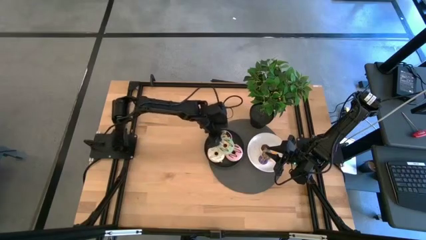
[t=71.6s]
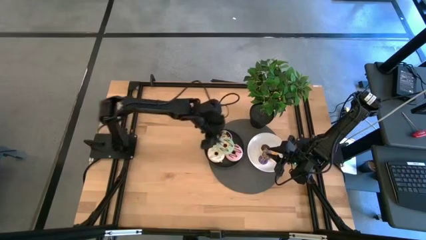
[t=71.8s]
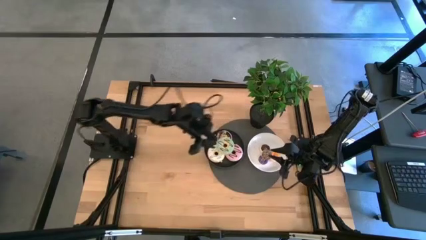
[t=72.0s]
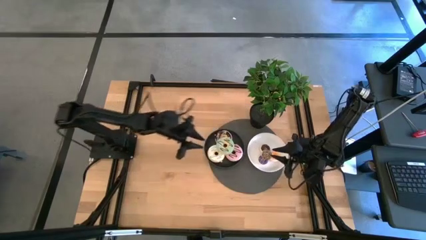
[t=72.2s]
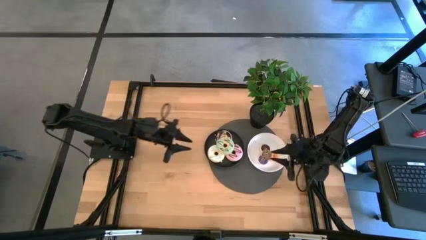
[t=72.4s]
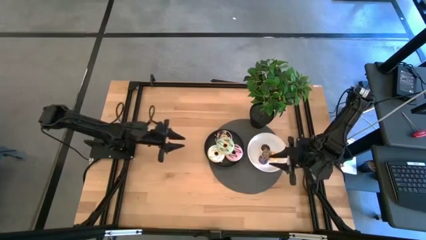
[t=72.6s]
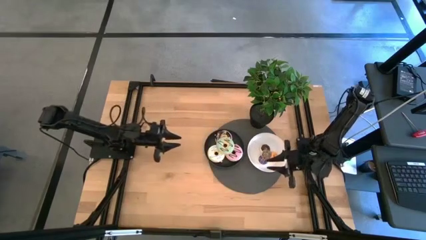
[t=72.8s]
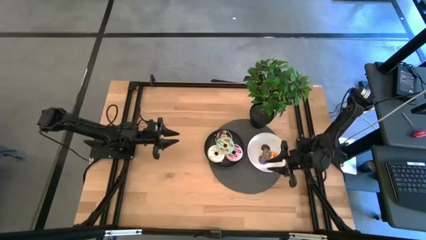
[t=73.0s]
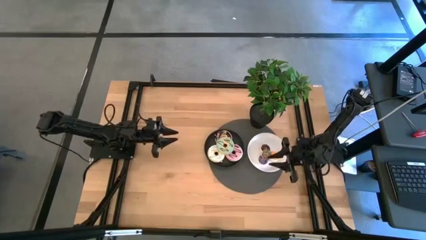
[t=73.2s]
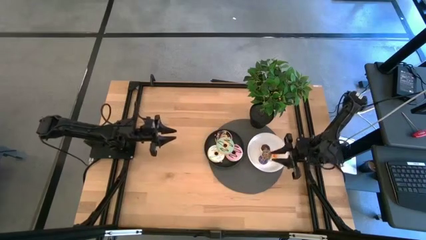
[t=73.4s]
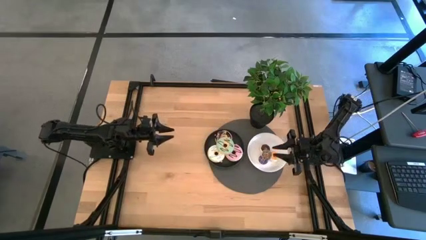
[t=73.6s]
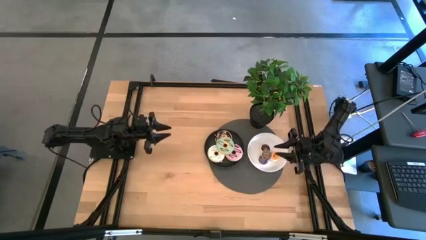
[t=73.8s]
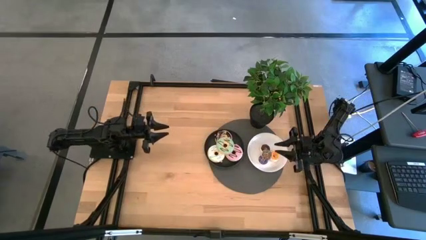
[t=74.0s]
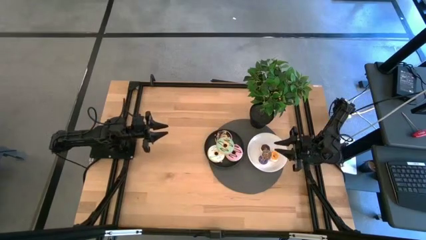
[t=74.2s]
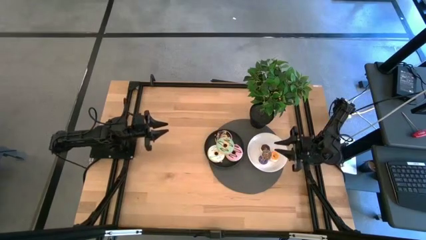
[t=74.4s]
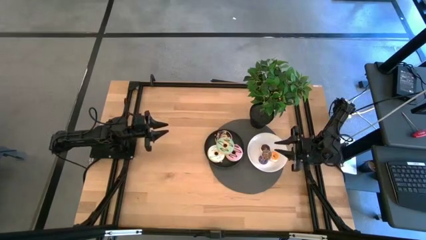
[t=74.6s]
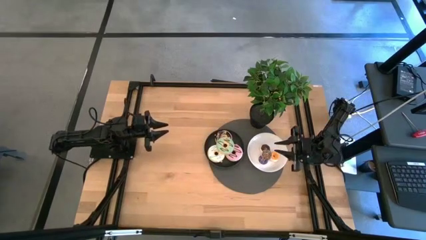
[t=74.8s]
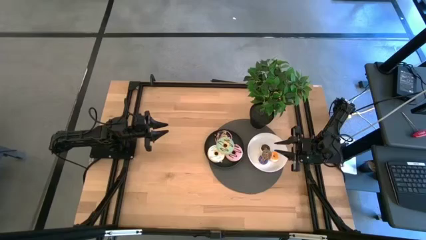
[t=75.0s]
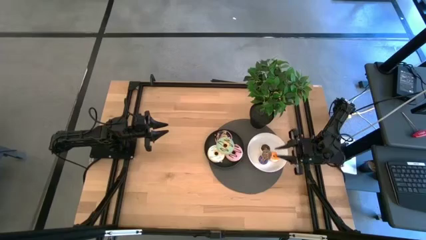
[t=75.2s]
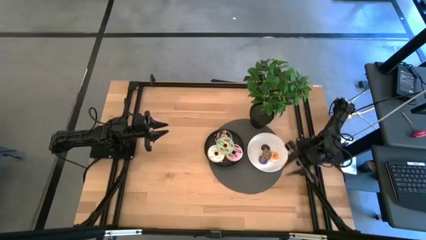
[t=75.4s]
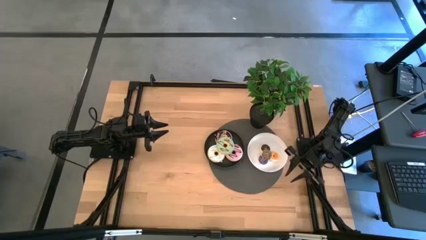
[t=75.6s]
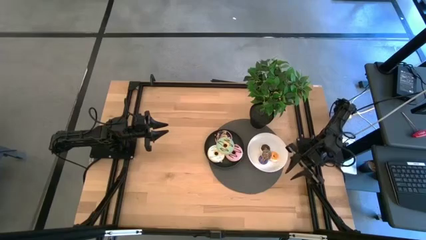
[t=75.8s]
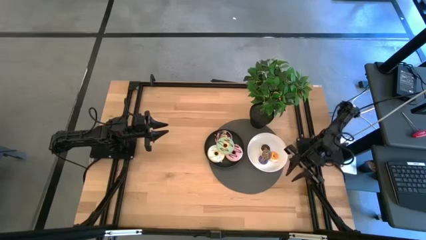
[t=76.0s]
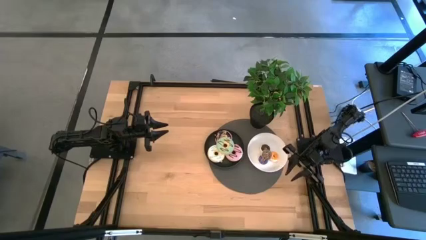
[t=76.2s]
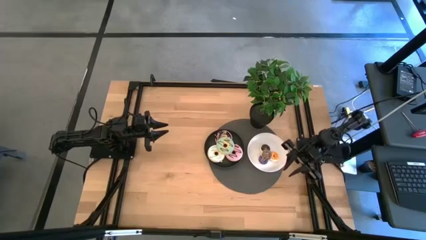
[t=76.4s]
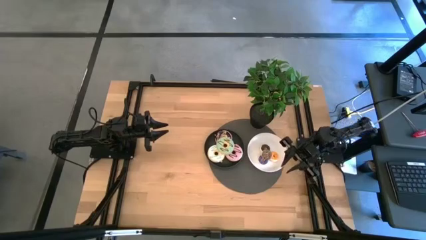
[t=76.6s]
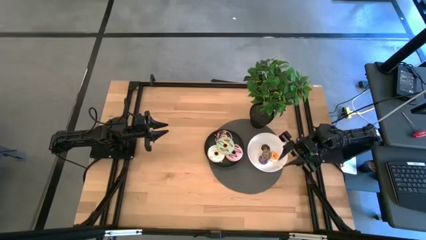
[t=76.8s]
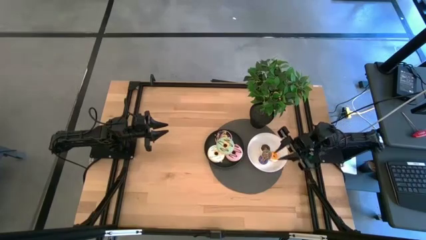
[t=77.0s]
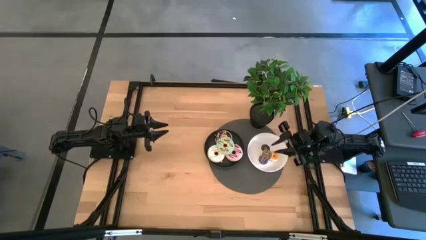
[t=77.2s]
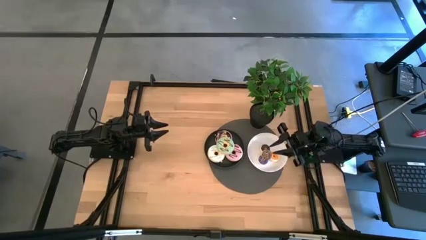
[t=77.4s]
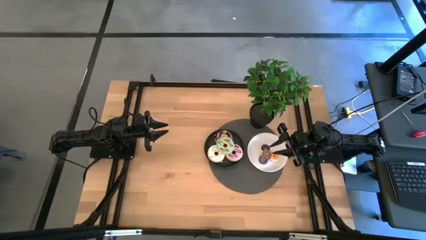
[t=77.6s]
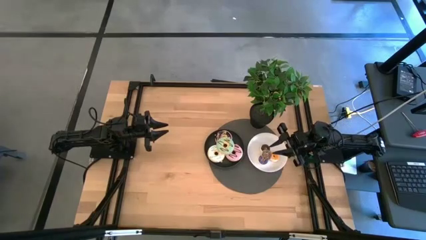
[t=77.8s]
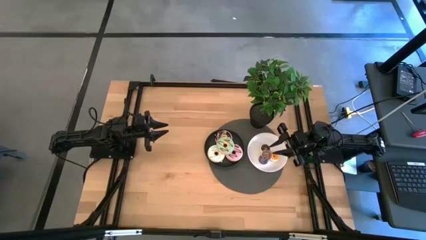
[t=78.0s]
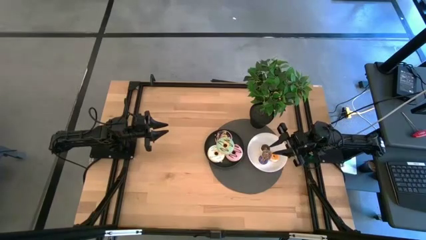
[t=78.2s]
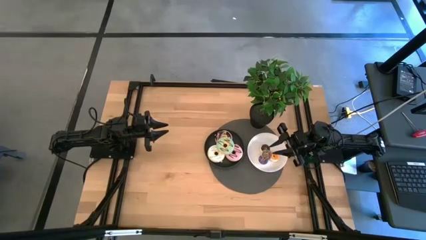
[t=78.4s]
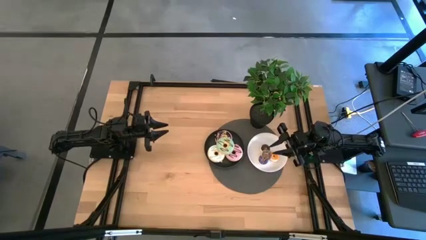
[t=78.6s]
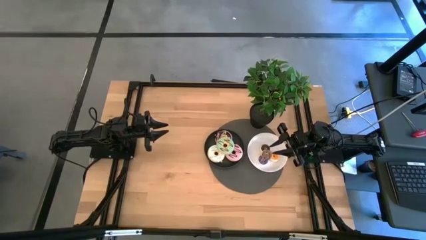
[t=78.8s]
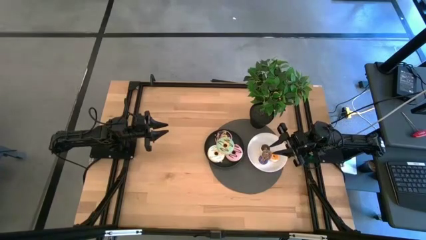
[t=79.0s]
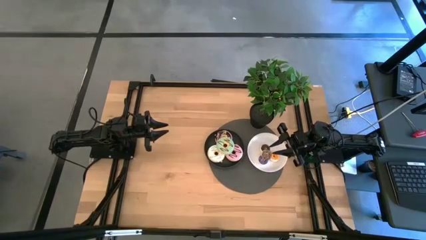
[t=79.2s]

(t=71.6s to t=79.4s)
Task: Pick & Place donuts
Return to Home Position

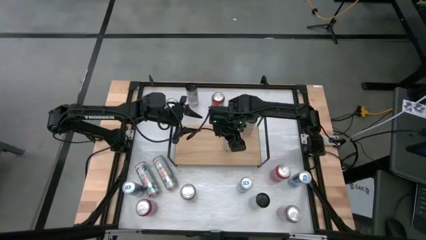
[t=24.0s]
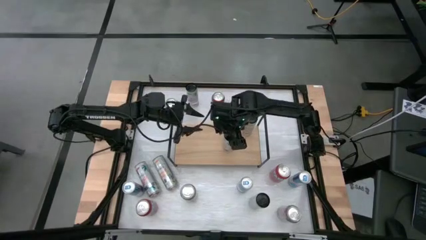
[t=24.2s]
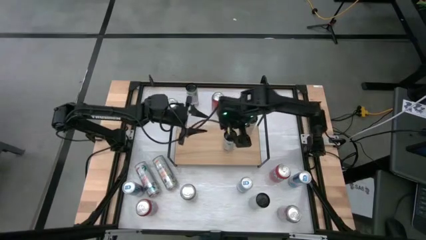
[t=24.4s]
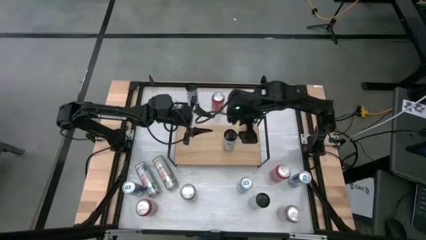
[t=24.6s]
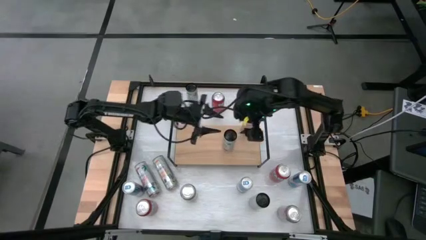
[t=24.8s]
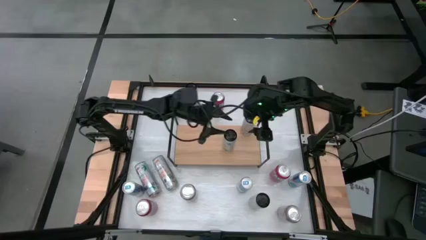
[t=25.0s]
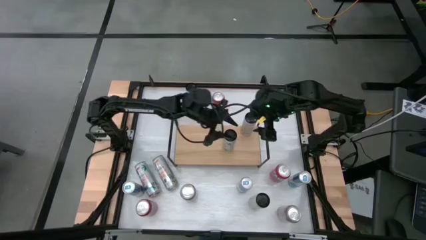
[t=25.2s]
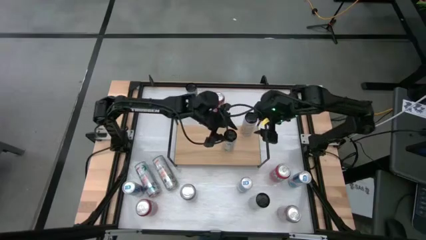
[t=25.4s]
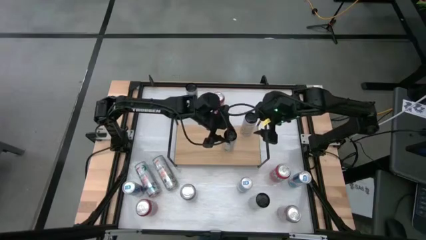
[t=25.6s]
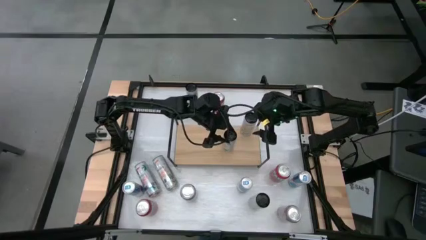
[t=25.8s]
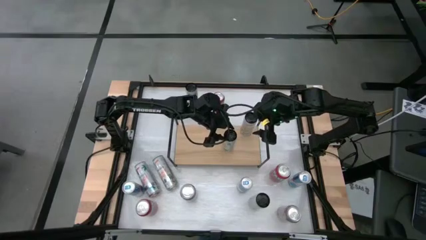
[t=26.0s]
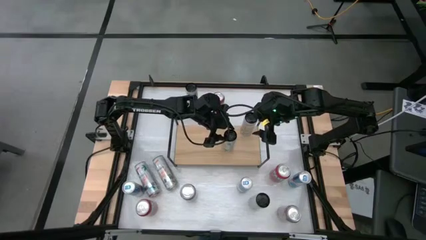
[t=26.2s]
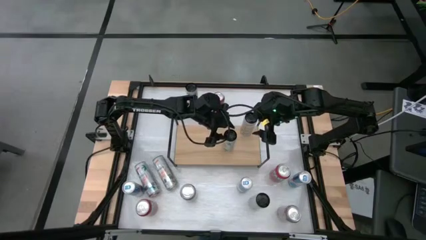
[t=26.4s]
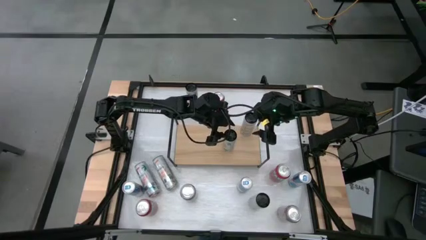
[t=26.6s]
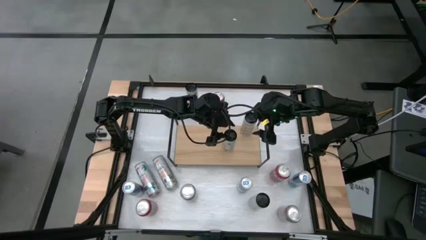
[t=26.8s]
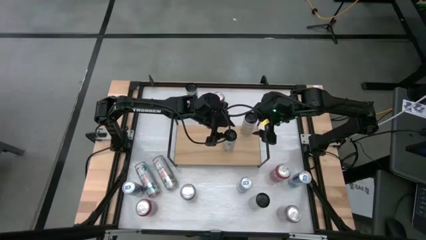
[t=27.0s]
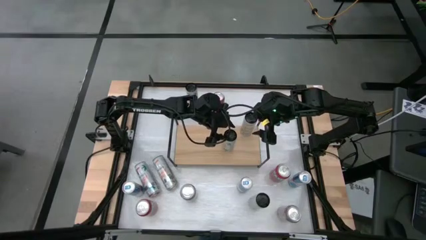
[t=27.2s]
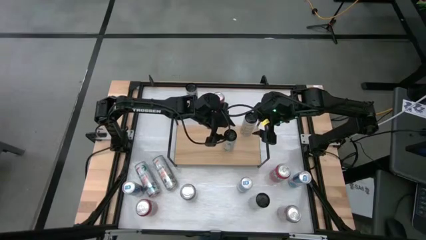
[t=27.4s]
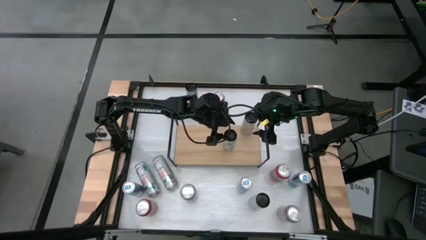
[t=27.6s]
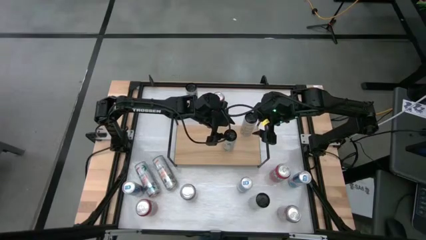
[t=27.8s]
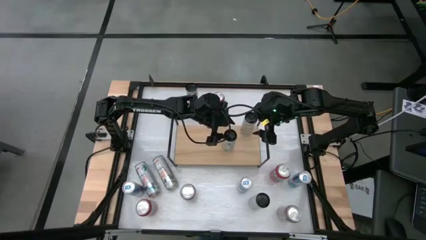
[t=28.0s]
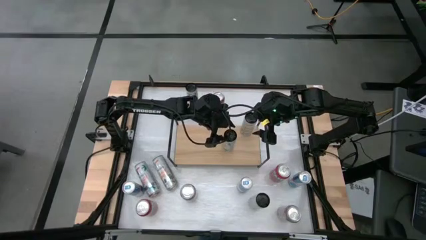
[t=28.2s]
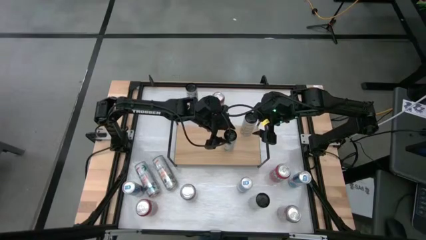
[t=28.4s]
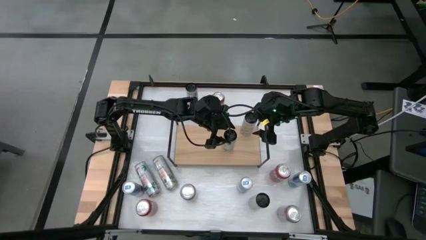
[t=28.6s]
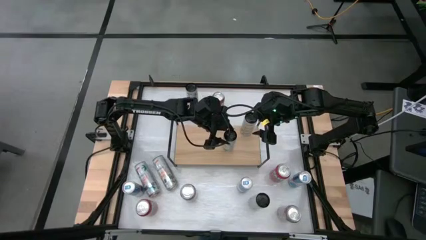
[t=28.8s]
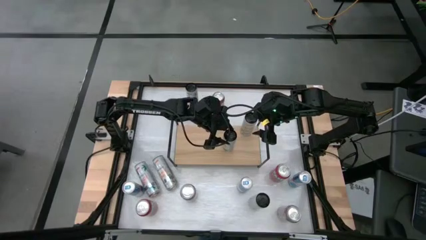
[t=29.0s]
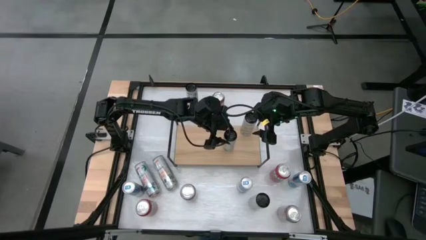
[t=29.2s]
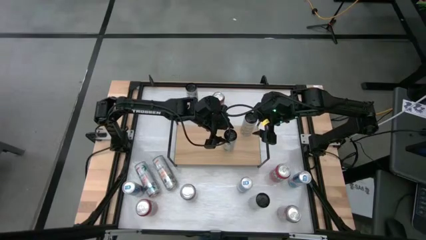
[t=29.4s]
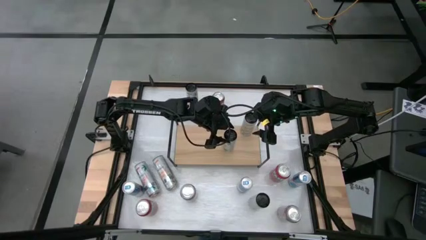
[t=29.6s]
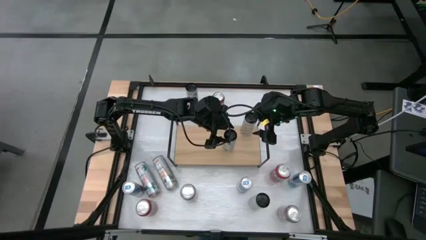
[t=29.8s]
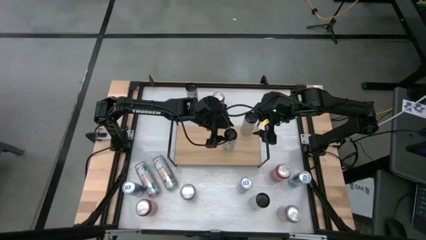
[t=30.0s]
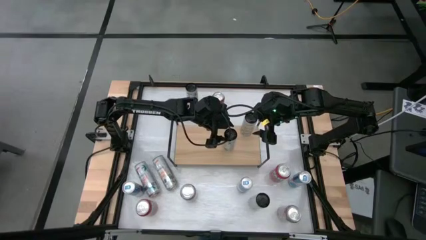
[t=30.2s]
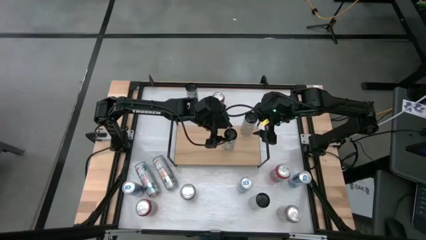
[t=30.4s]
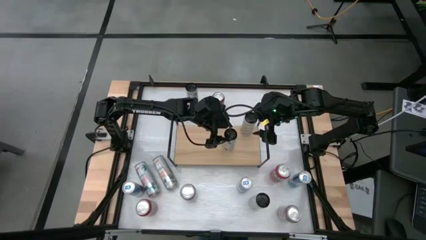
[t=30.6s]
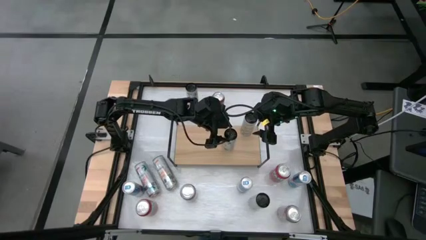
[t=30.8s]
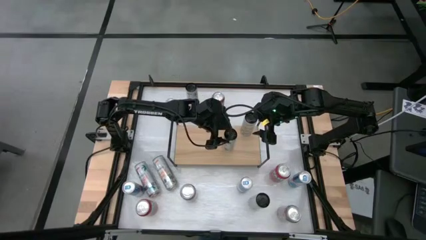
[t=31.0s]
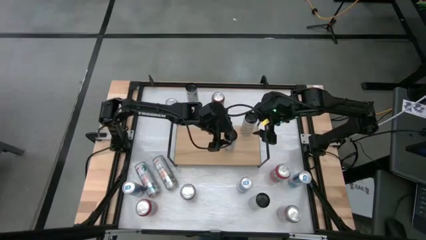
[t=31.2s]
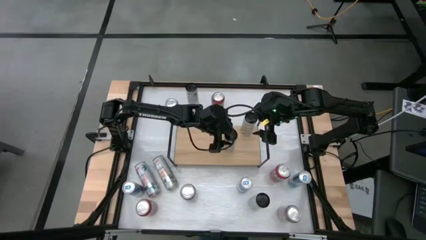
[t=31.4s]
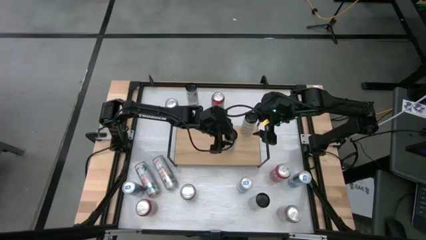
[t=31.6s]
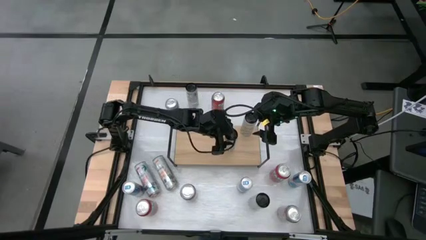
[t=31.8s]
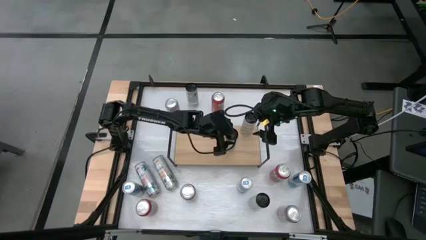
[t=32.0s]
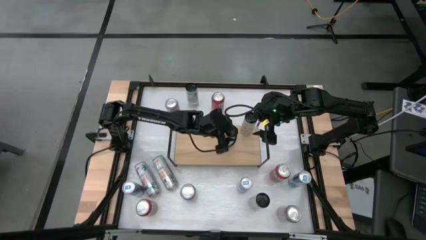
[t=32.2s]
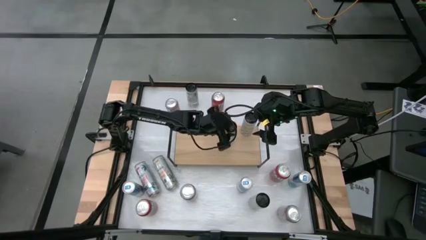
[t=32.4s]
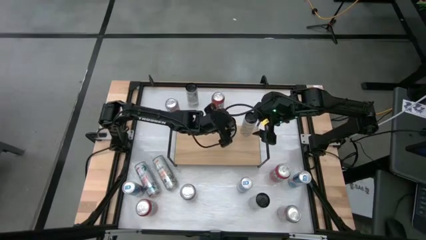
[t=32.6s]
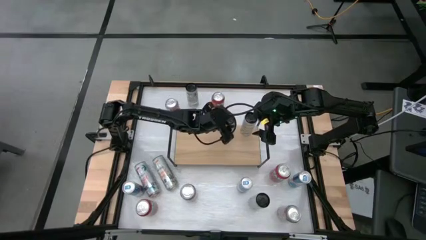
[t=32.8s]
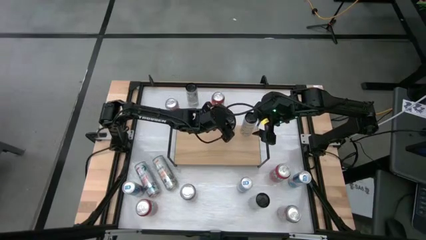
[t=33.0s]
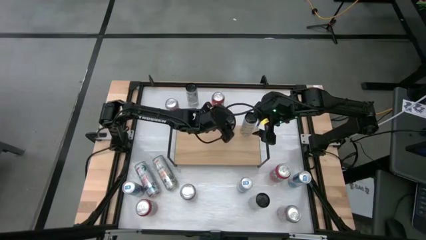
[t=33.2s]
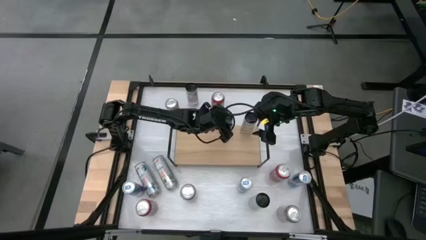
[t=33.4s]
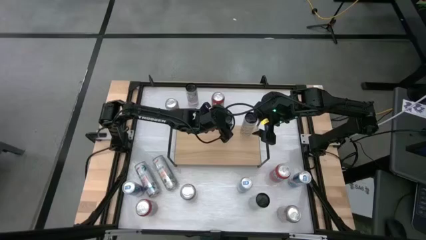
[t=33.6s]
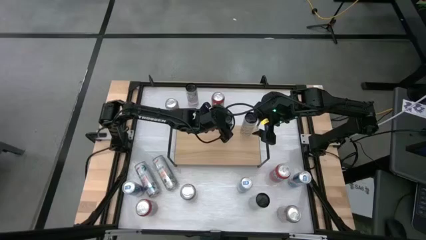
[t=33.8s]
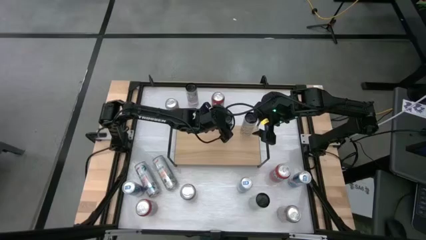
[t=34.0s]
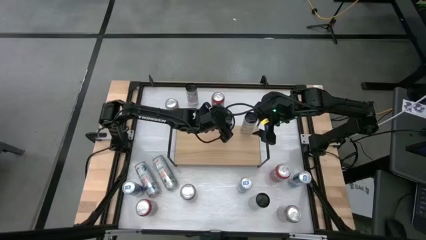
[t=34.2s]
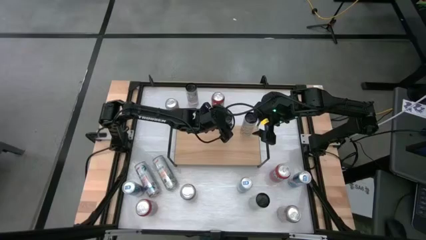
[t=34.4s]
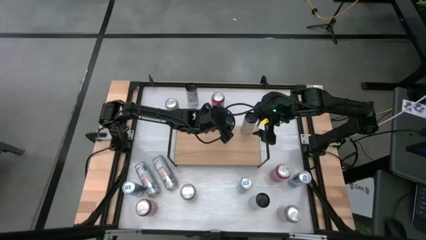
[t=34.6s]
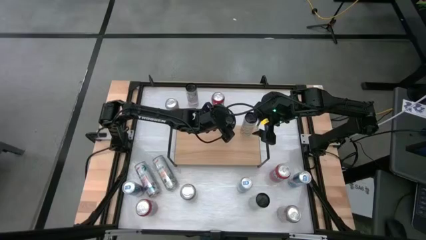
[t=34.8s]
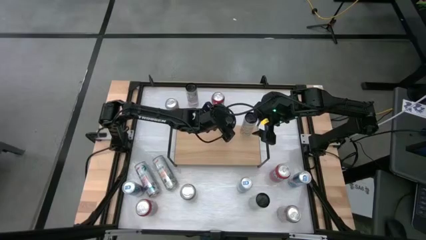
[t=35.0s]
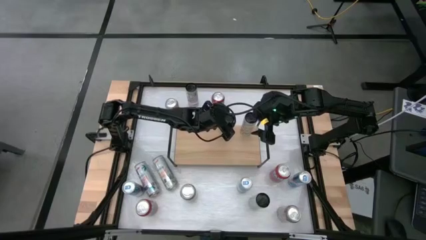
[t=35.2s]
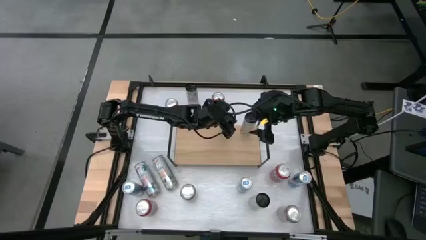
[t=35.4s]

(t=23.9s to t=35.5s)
Task: Place canned beverage on shelf
Put the top right white-pink soda can on the shelf
